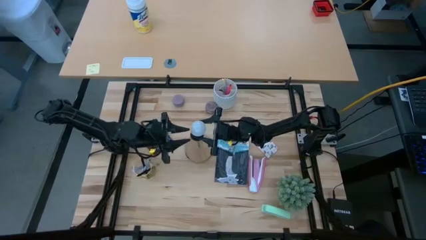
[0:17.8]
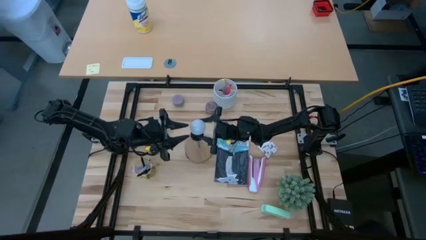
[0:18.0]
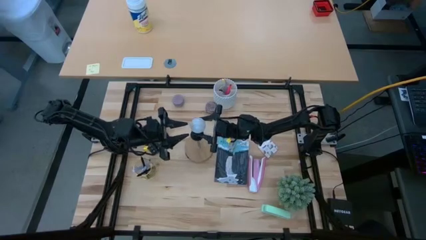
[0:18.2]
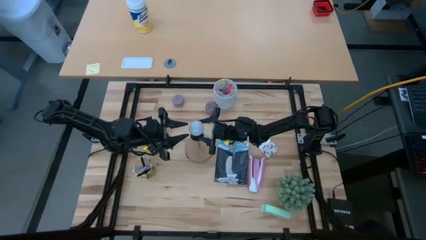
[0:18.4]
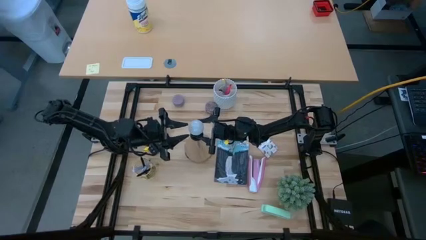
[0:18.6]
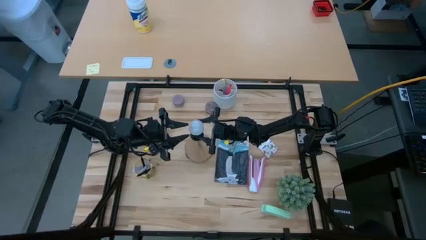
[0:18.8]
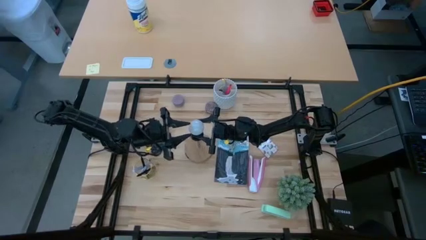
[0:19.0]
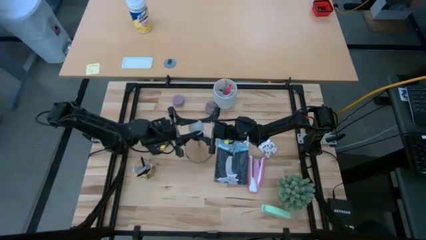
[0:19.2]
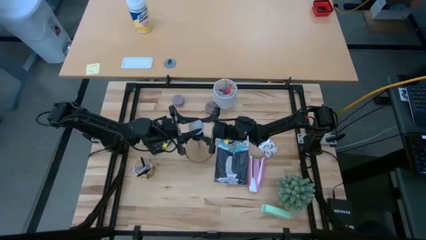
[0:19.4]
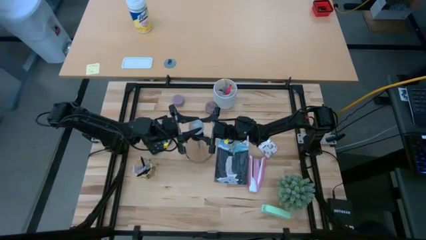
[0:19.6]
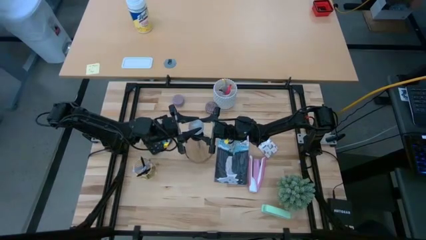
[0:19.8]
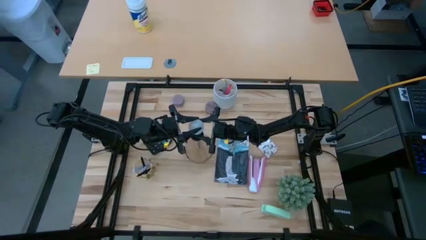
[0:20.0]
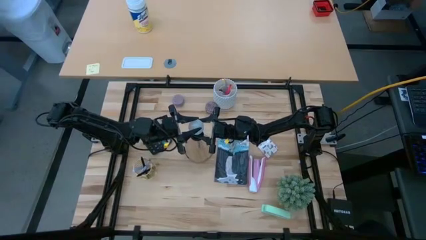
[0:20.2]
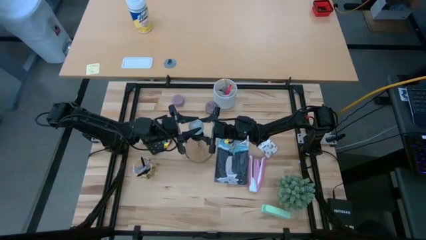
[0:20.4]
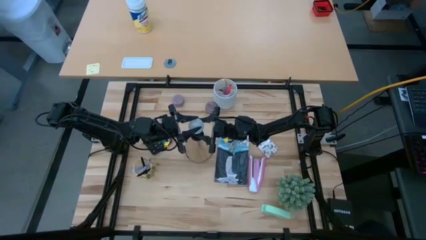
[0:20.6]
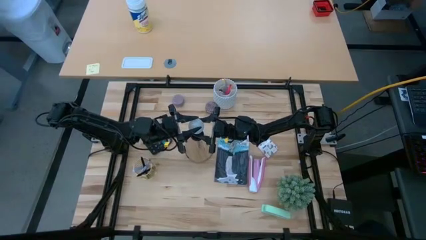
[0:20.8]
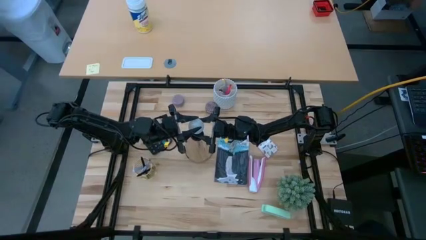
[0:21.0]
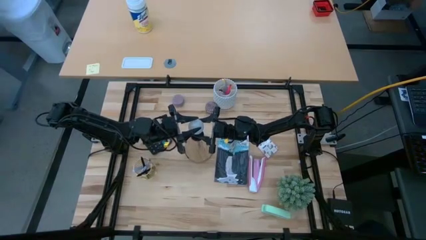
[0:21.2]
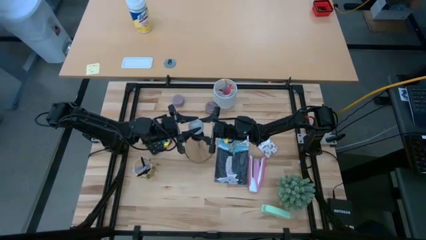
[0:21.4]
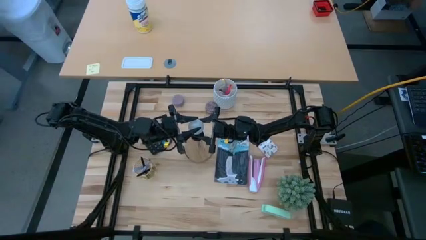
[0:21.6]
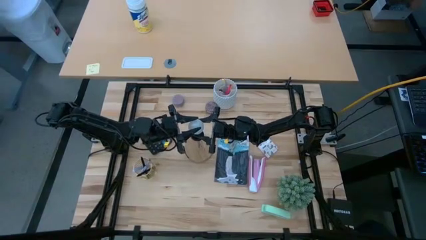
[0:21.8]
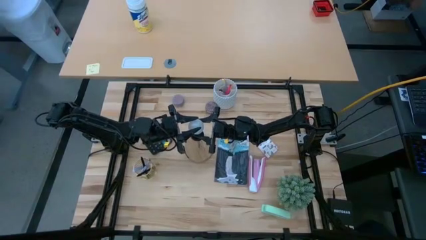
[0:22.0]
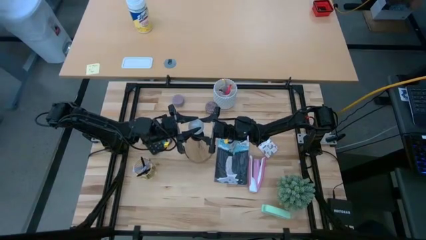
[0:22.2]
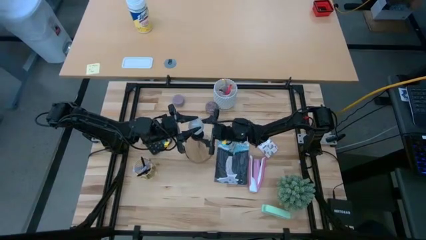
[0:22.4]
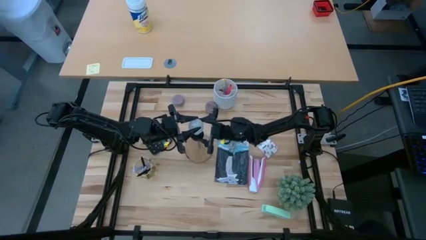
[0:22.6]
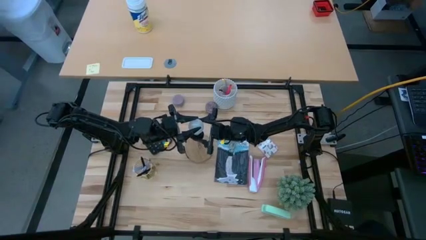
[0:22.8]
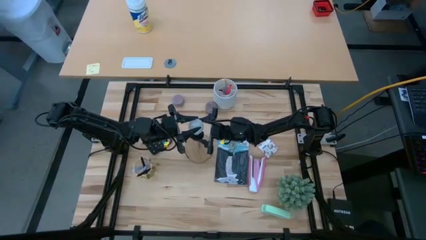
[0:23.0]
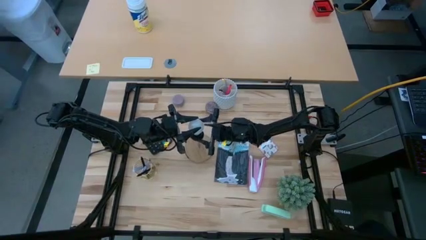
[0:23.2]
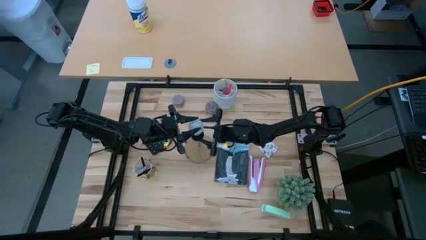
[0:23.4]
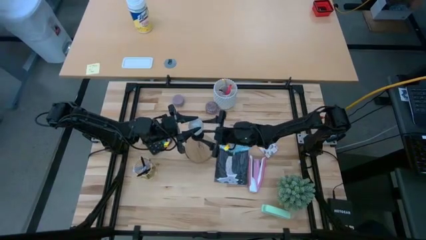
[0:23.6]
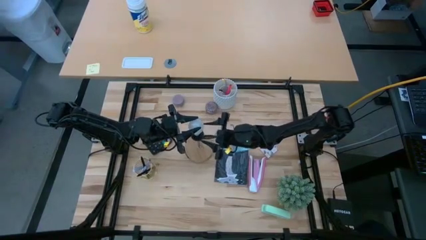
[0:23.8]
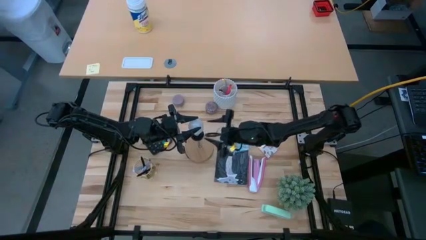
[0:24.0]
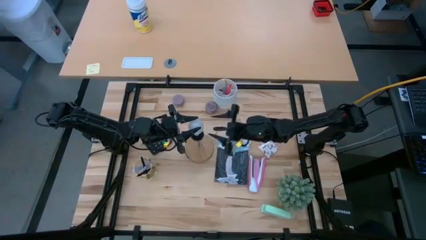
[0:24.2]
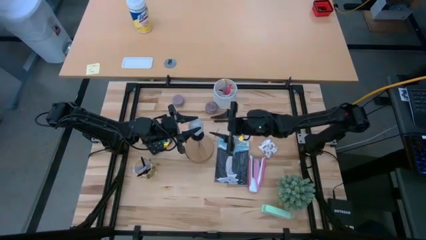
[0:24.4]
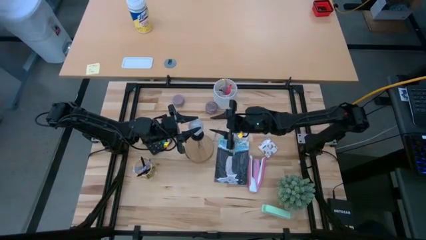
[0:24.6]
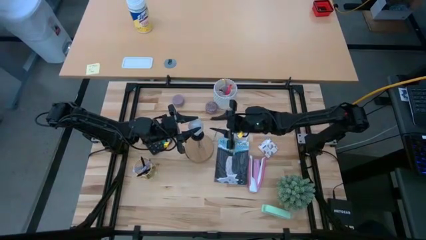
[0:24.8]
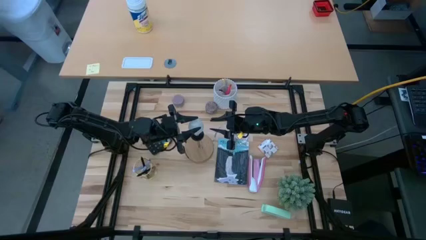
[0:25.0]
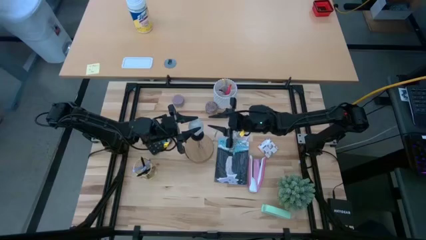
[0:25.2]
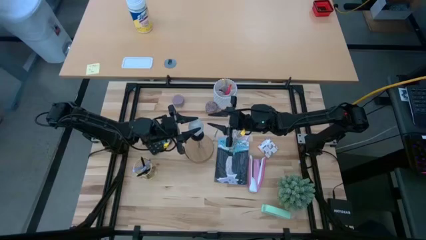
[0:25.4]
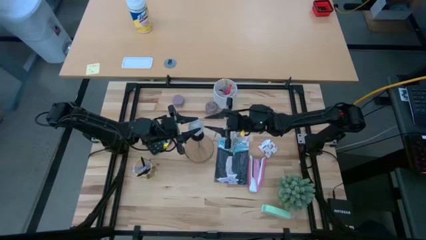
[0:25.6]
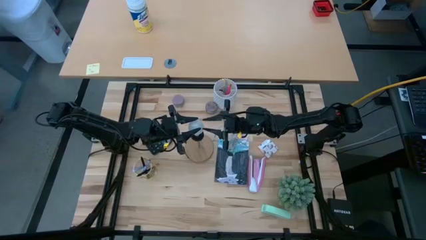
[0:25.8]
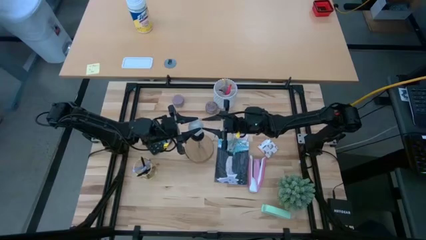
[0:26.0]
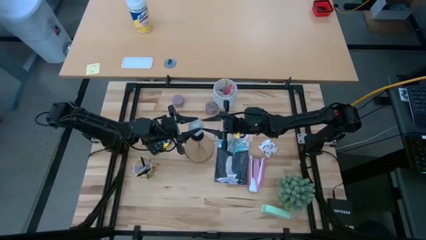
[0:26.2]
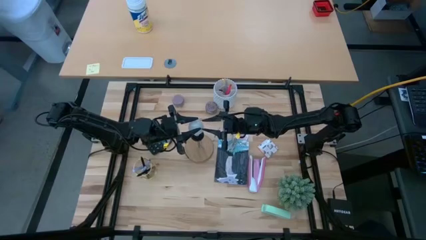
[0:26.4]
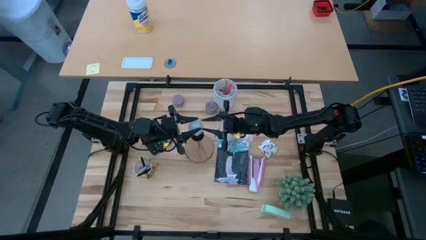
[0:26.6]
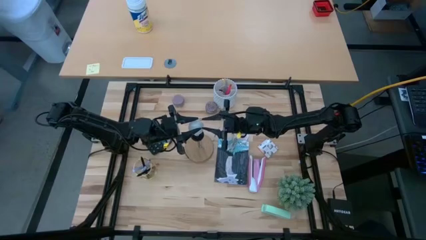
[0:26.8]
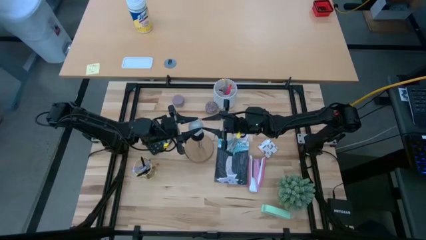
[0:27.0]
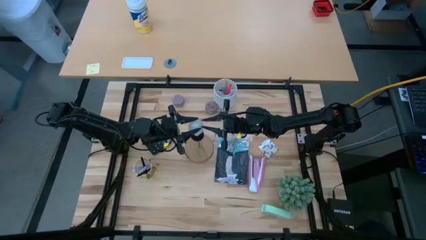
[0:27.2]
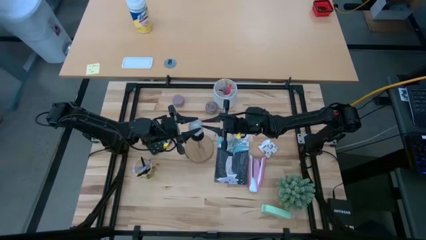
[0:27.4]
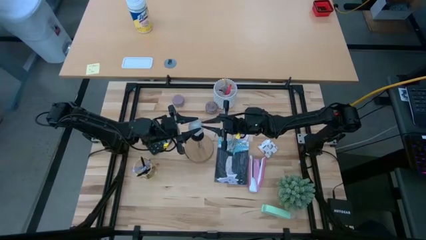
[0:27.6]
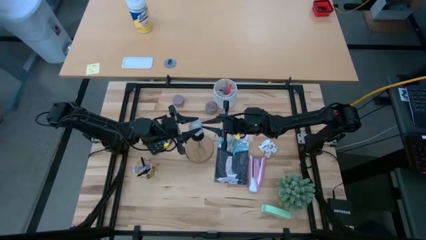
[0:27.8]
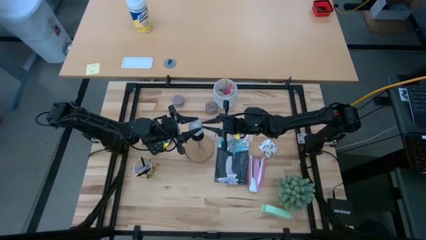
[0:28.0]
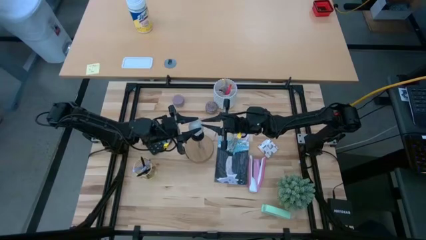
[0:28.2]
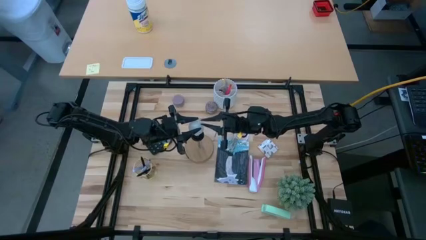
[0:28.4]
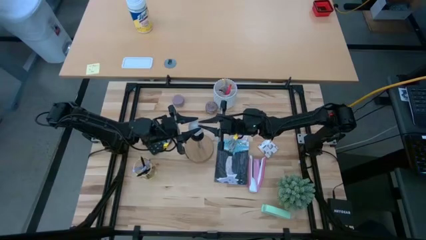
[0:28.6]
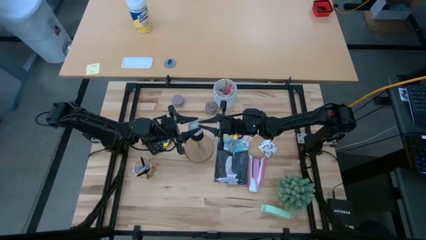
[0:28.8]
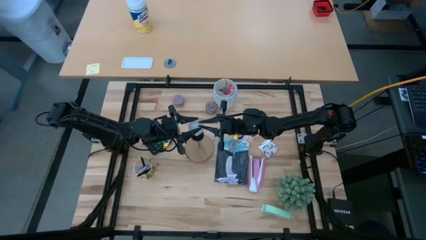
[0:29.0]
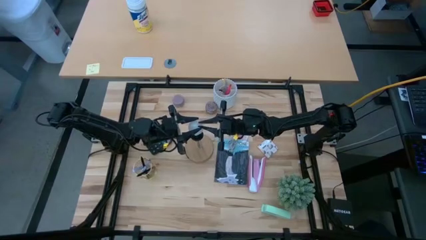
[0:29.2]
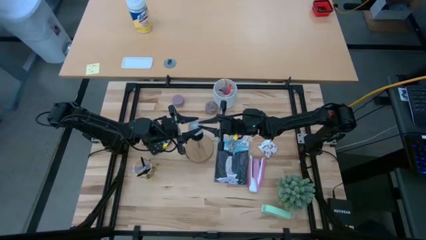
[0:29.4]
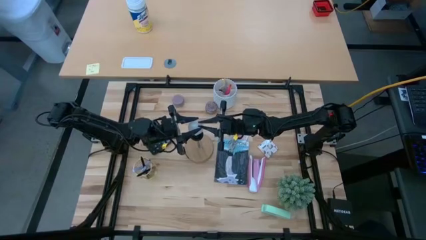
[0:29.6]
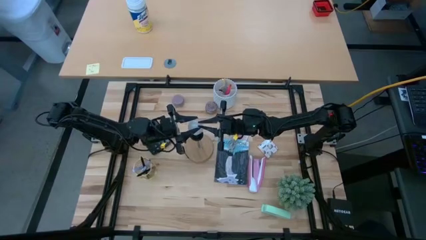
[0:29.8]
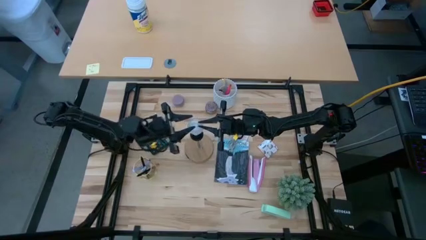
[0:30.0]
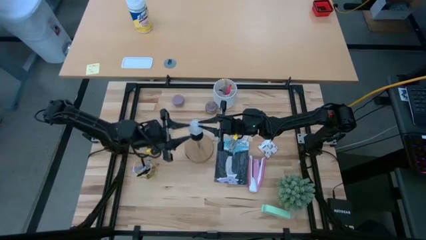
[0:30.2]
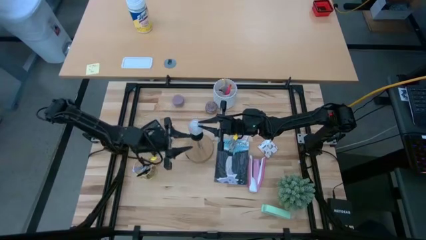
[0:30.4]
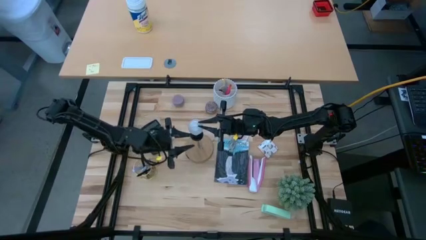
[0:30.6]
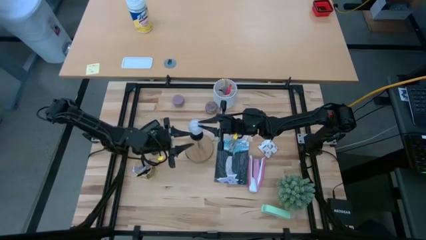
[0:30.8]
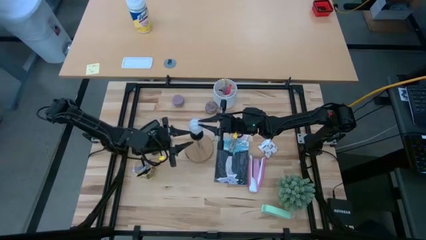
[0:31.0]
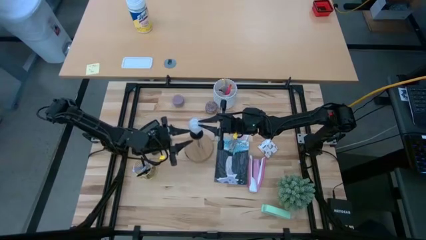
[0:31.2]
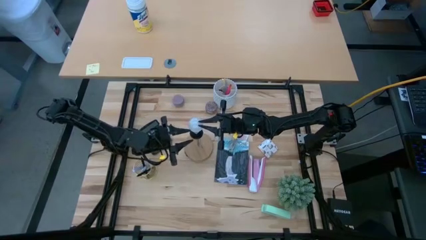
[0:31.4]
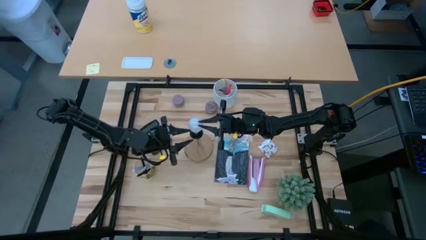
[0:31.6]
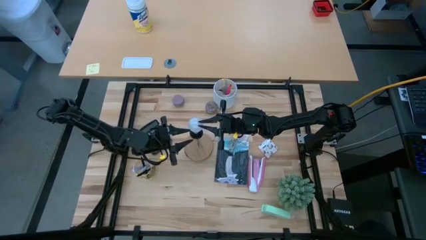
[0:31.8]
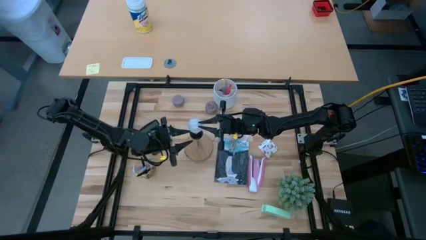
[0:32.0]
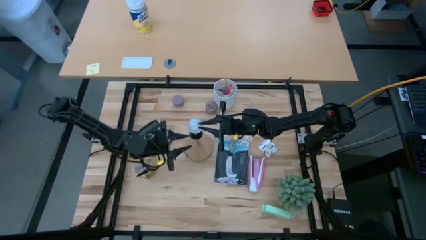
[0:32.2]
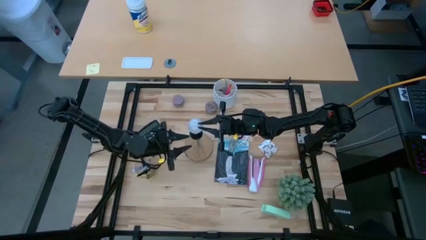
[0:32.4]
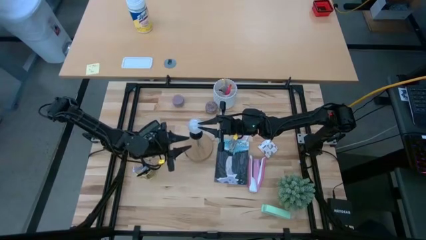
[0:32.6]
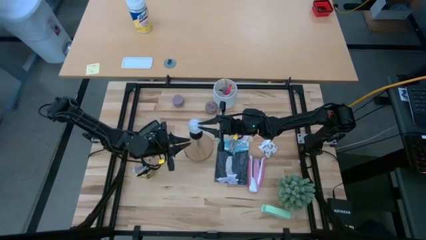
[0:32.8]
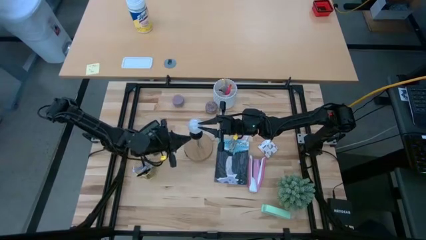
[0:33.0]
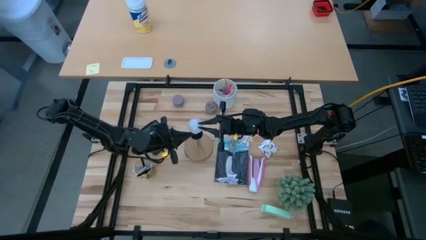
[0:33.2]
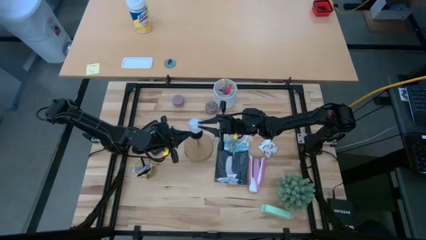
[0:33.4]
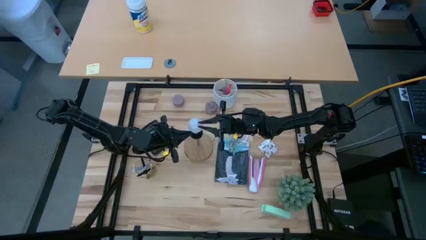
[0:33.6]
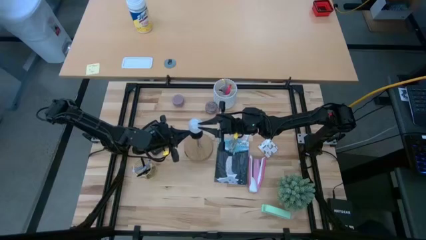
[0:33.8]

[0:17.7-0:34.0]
Task: Screw lightbulb
Insert the lightbulb into the lamp
